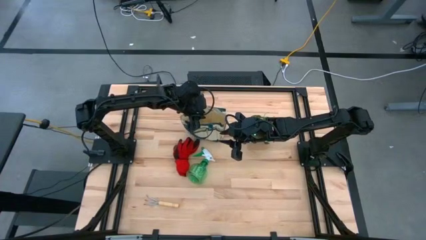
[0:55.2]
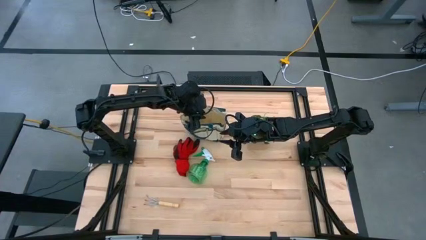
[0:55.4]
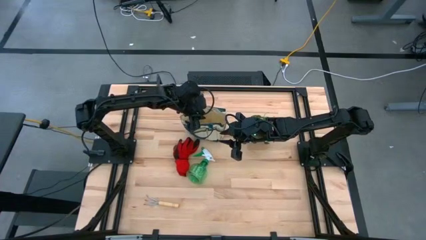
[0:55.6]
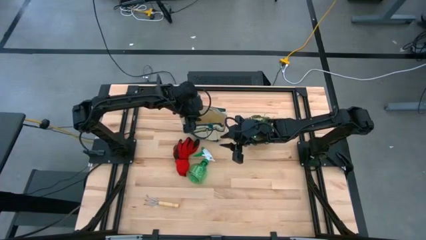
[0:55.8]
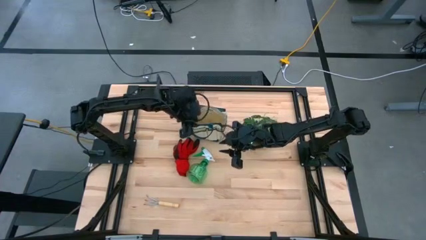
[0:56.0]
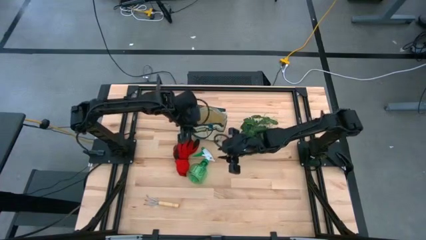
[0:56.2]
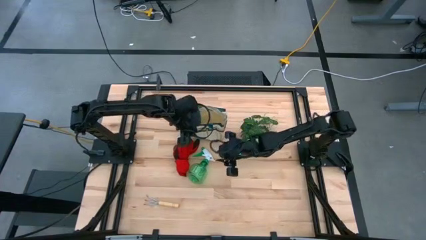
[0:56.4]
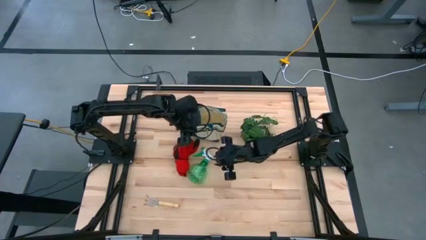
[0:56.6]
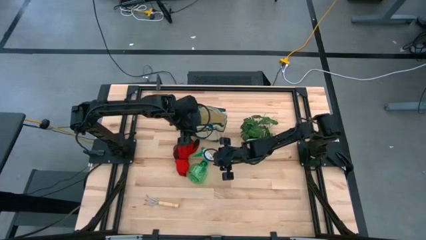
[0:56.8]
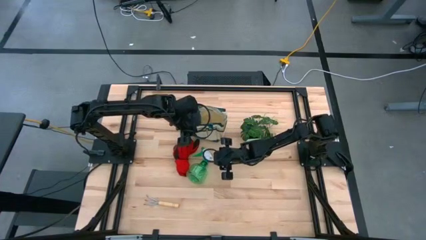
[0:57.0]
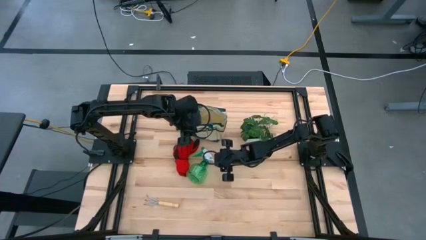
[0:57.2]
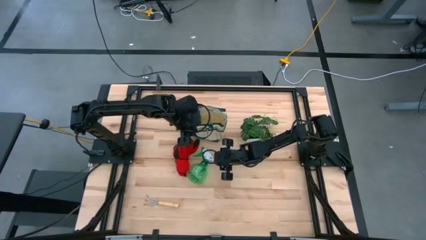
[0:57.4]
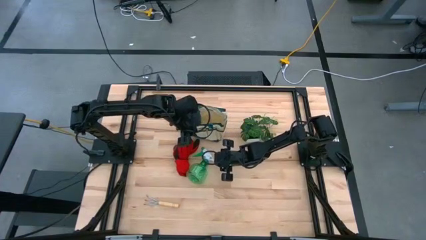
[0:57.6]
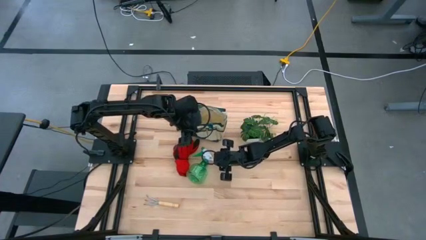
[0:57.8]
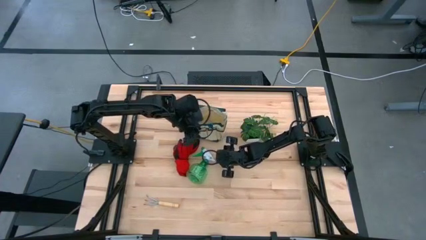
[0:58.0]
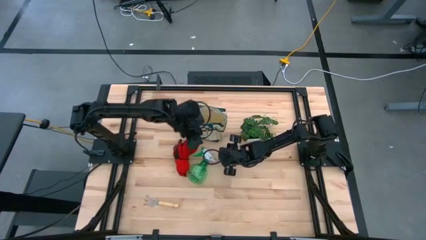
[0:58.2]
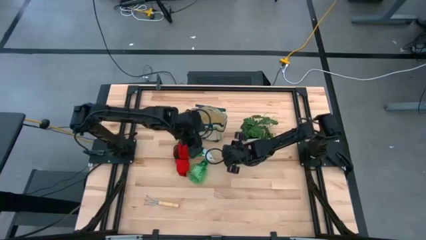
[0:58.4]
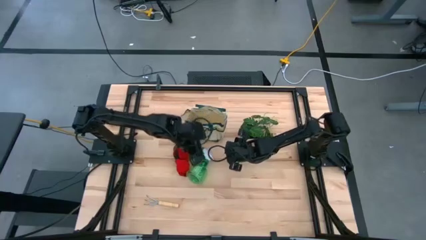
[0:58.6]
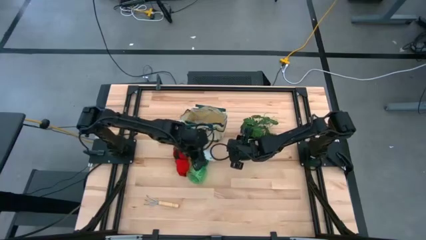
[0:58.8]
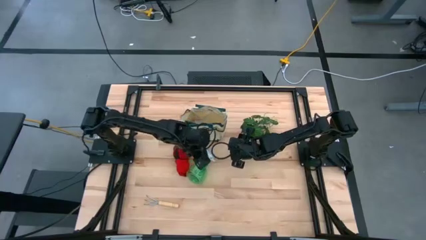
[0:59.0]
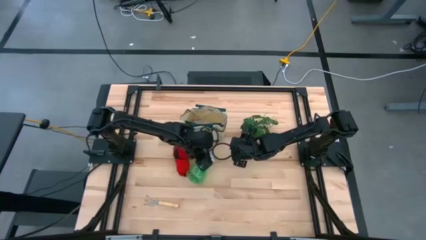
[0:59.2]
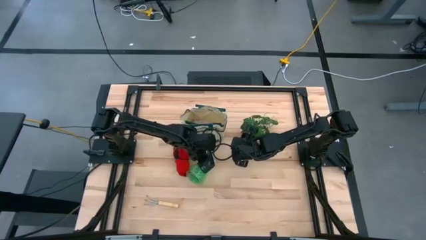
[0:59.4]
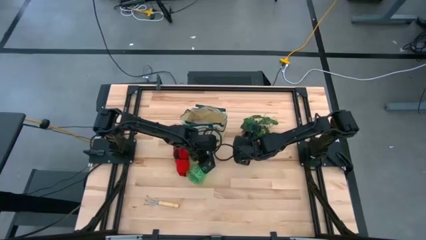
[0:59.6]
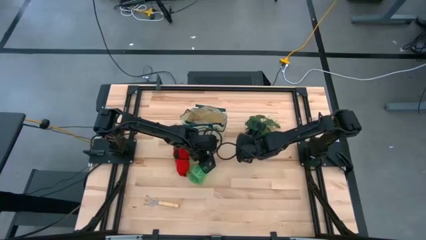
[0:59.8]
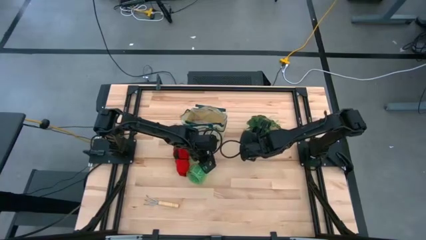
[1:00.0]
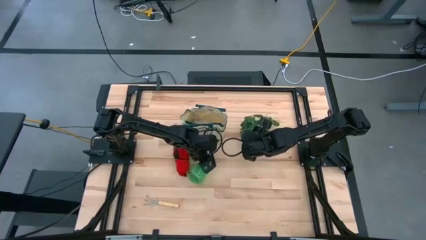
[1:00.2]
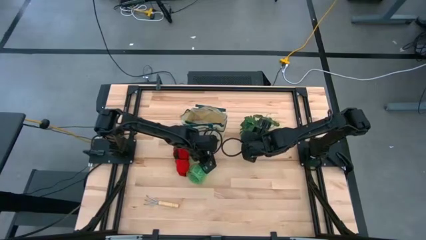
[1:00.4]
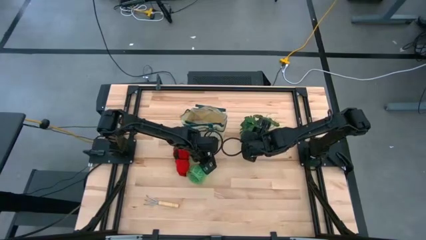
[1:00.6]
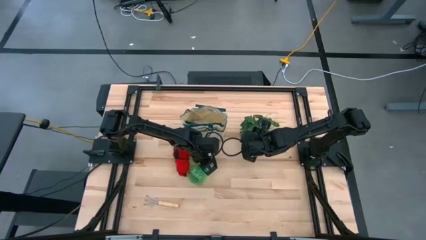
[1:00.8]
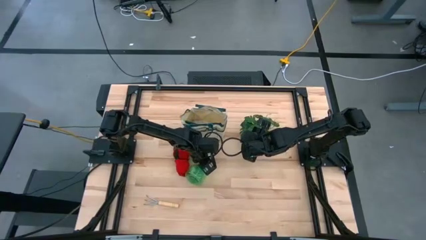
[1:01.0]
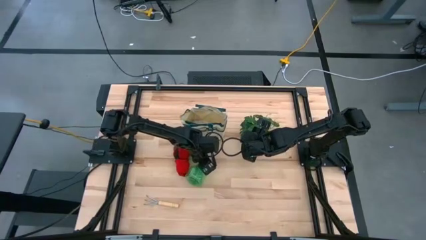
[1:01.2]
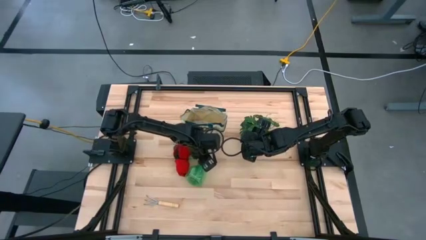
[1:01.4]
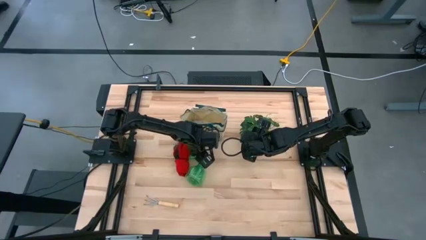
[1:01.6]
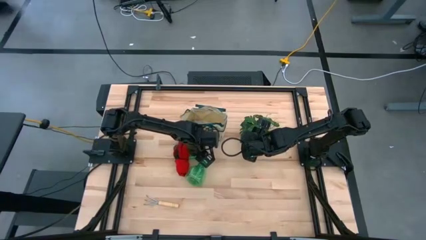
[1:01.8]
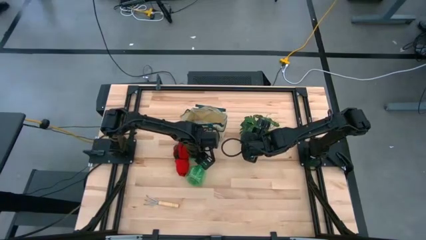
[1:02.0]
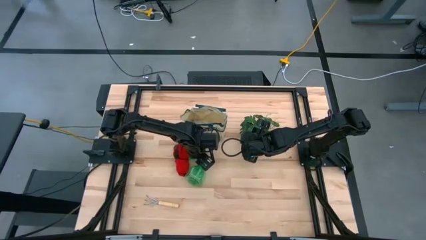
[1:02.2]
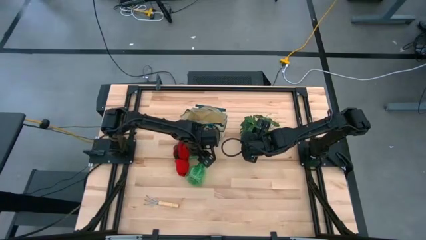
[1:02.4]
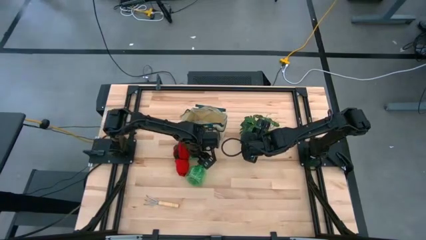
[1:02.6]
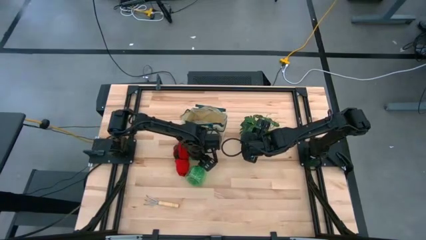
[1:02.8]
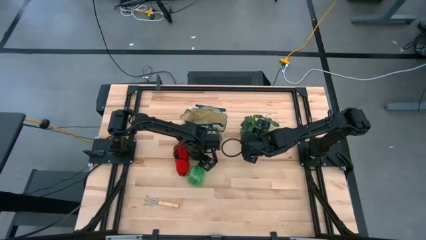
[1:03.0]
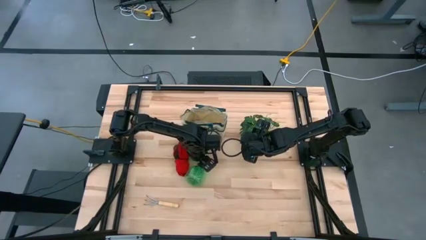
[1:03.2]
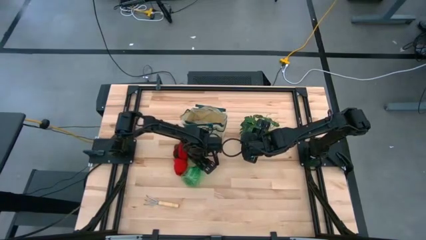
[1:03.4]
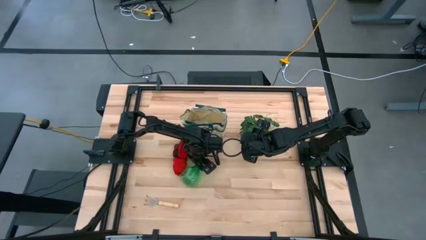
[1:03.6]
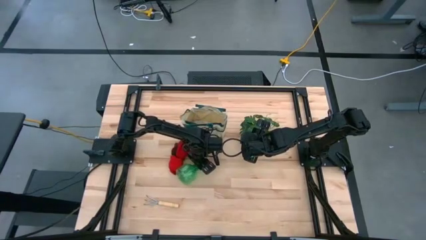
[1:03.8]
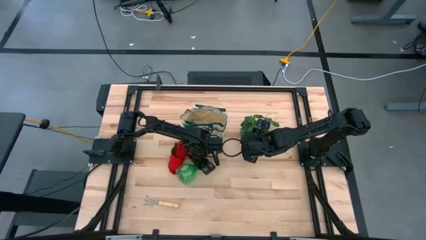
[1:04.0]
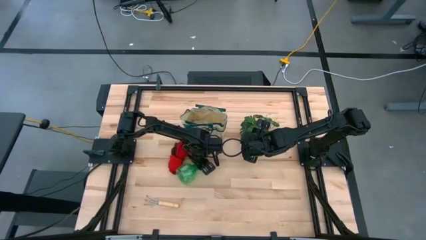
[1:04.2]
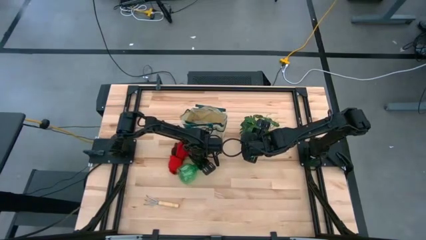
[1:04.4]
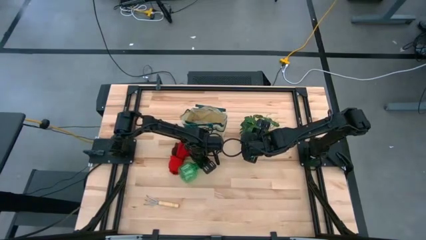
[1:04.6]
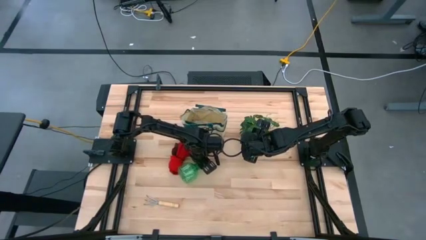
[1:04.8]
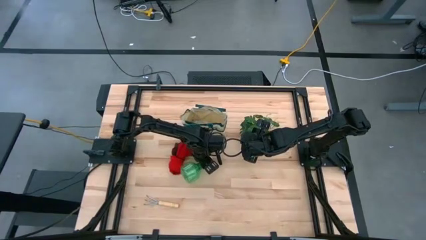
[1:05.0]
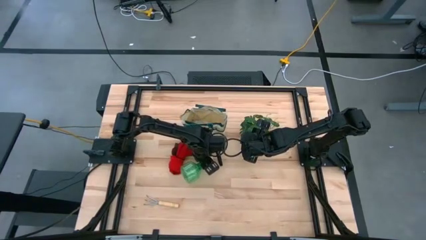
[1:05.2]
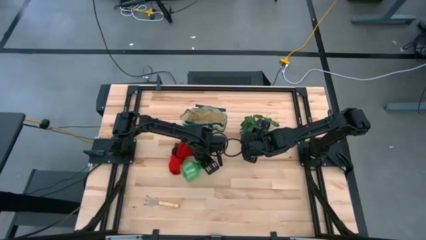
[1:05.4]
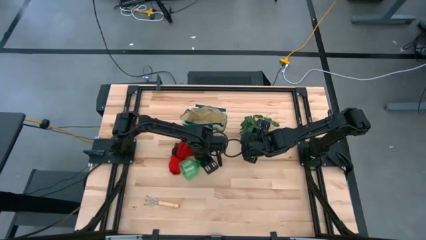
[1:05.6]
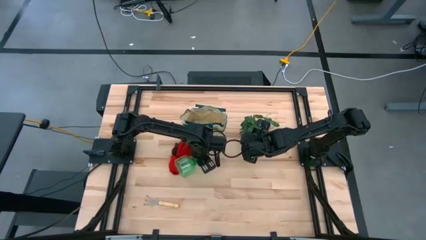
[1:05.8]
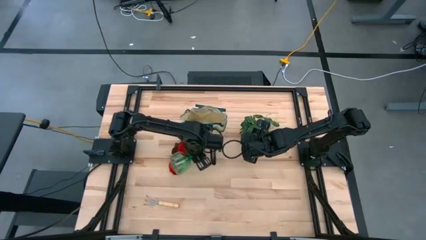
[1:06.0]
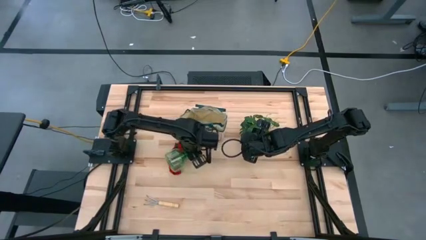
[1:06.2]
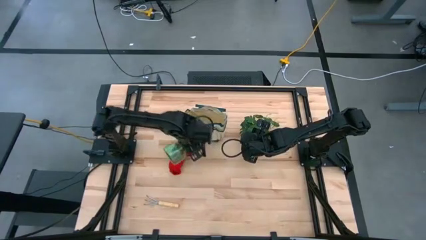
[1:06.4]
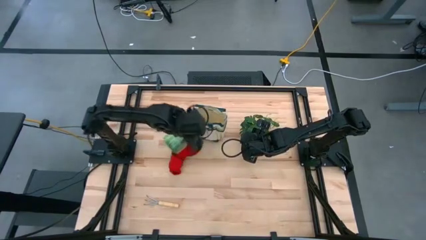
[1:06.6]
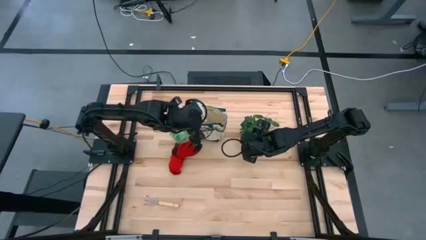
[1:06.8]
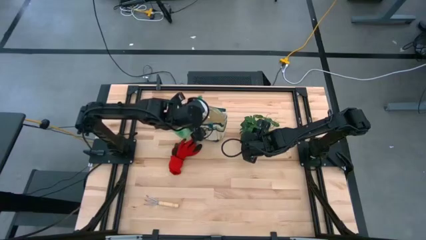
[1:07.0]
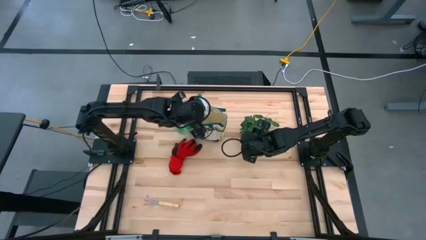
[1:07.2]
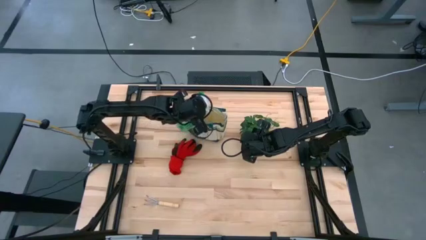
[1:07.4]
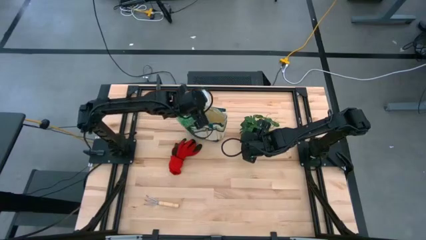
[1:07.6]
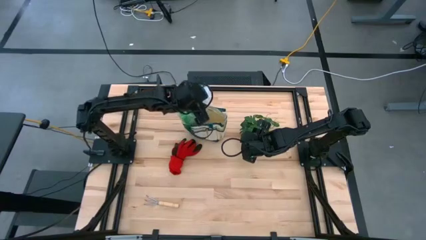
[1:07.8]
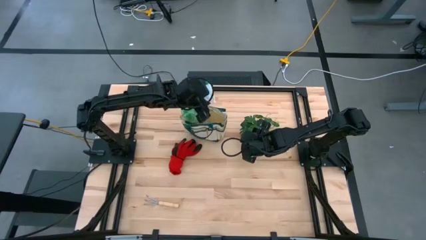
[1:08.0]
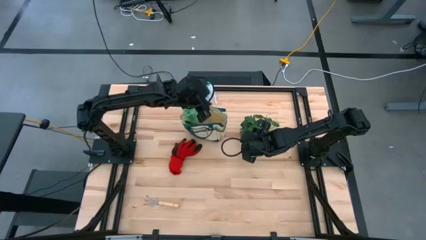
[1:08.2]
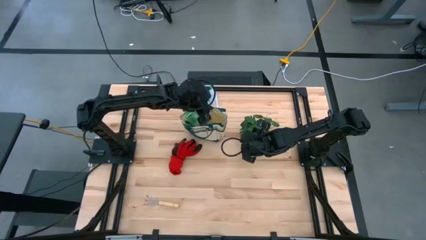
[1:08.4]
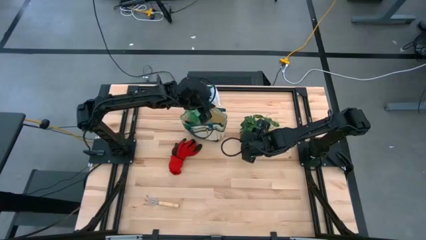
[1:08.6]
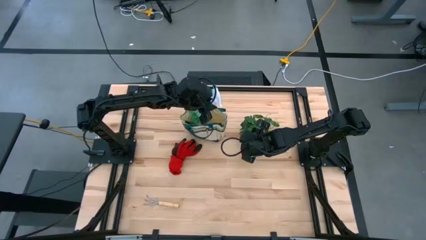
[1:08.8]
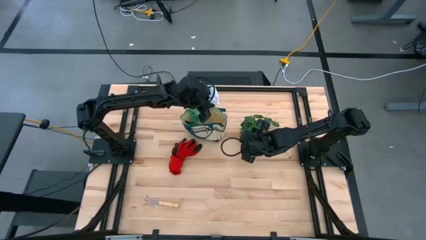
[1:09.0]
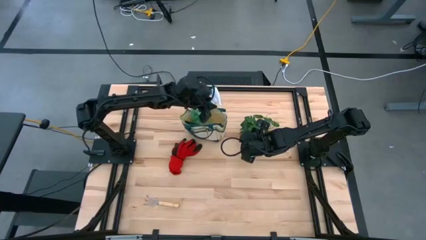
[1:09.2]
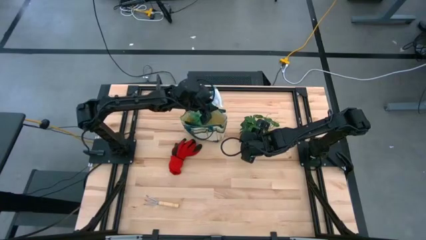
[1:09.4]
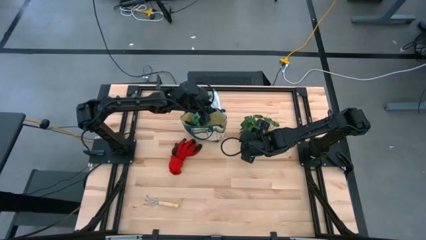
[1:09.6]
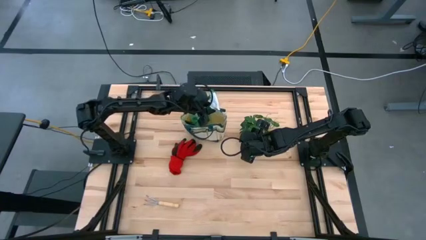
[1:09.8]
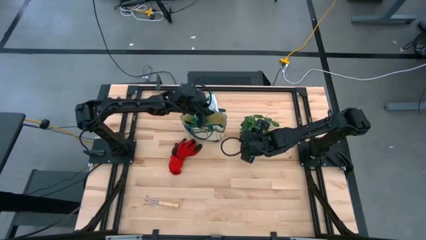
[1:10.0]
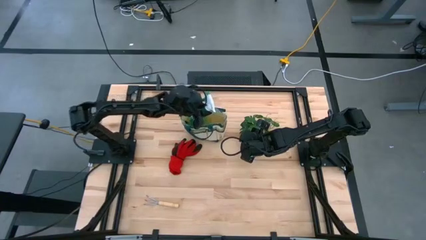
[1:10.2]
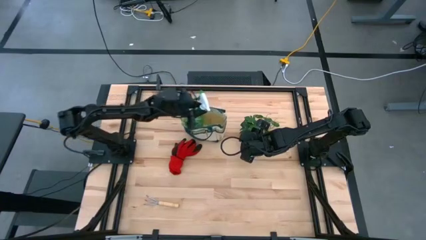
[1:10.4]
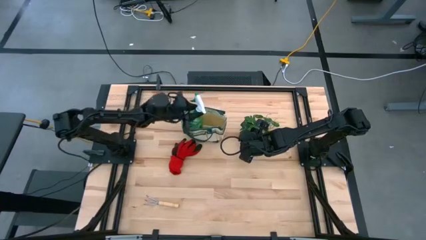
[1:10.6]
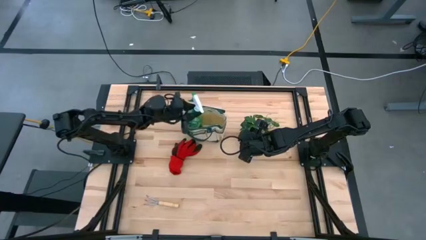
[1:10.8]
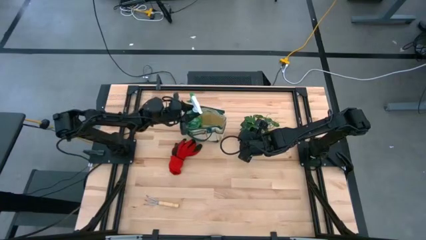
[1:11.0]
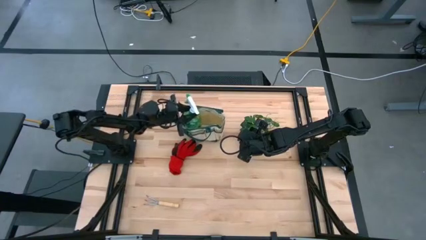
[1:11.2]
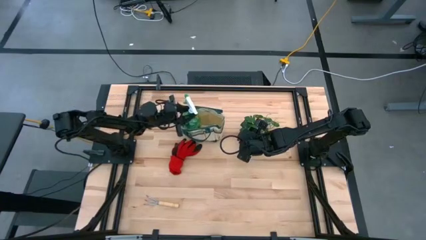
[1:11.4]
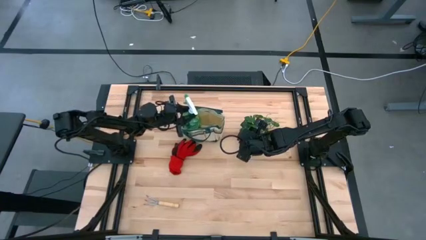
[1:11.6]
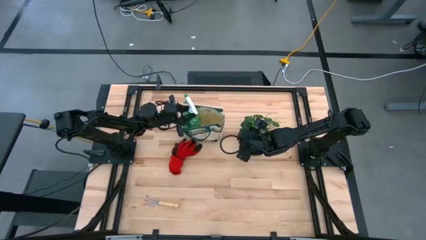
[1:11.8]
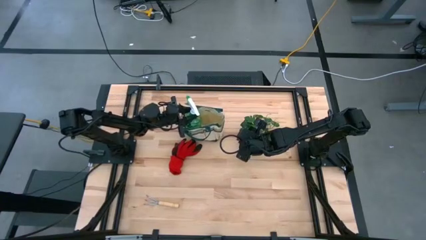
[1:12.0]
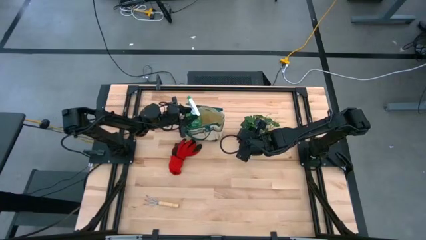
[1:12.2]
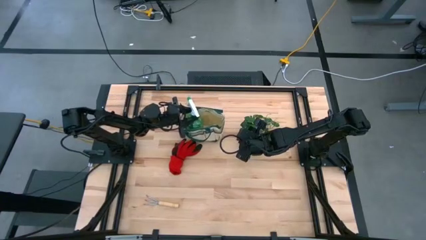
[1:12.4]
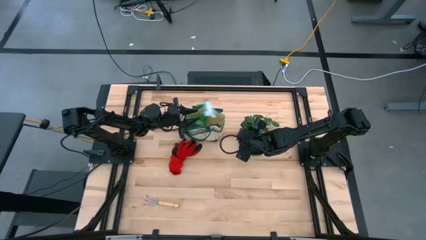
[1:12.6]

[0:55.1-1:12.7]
Task: Pick & Place Garden tools in Gardening bag
Put the green spray bottle into the green gardening bag
